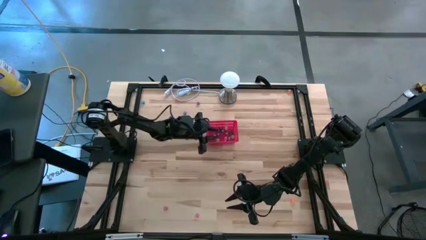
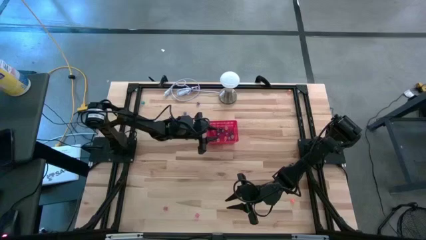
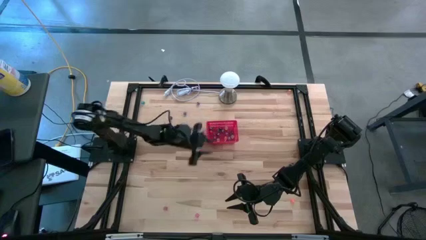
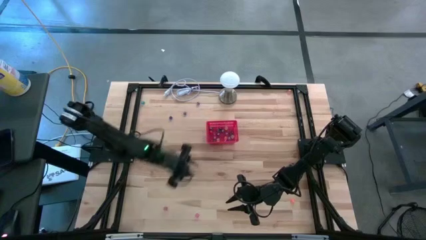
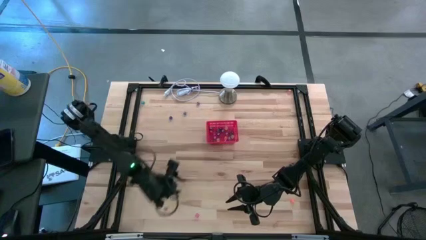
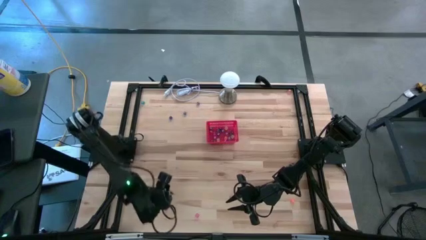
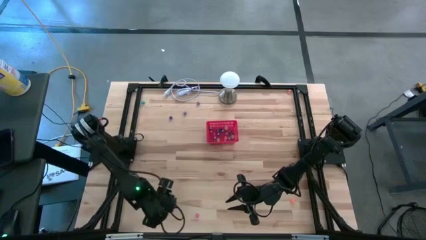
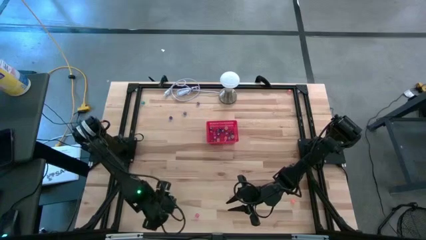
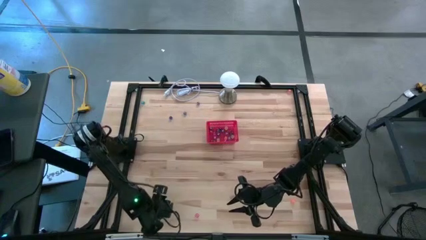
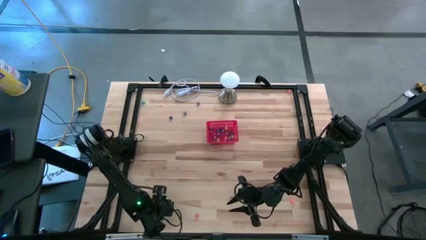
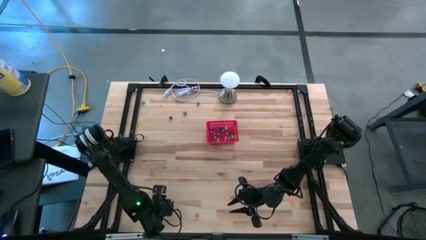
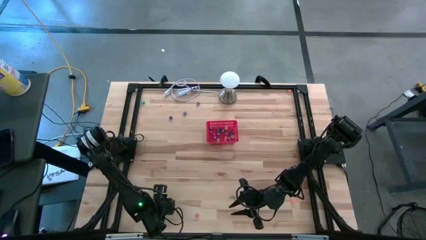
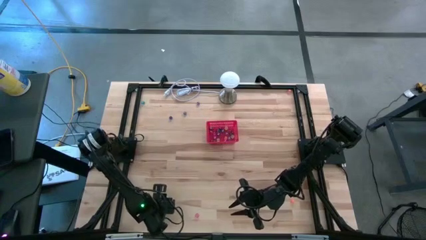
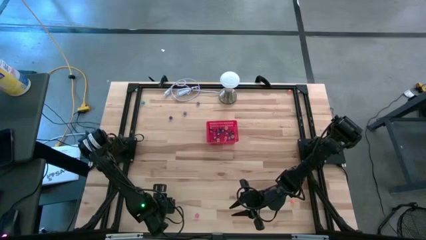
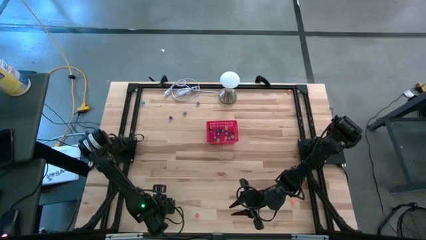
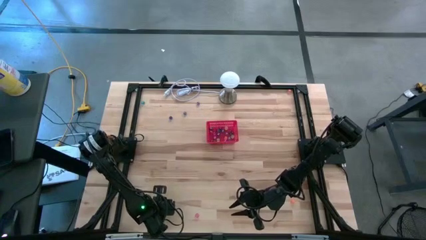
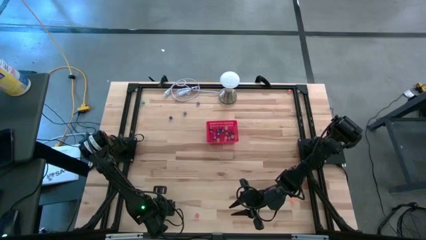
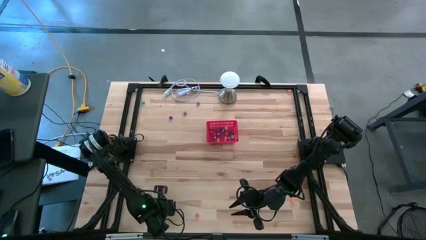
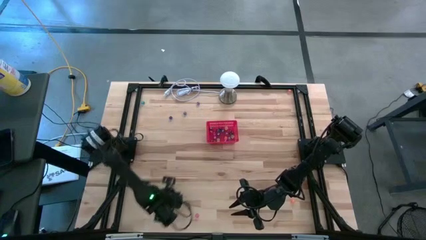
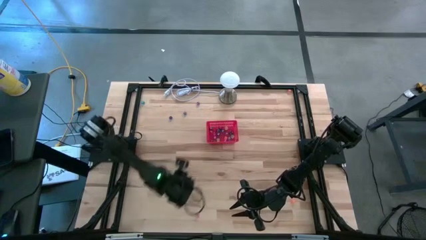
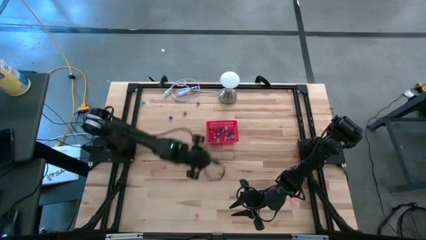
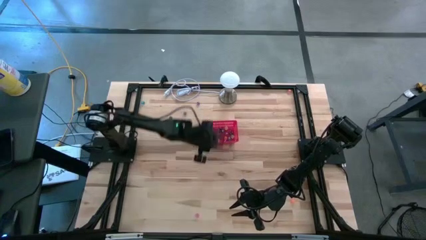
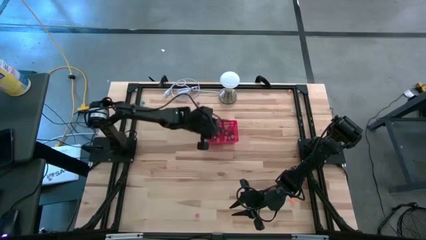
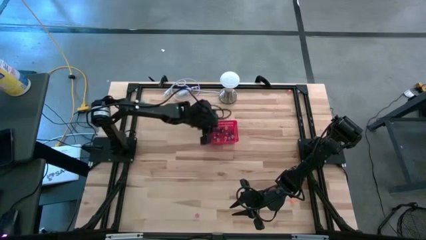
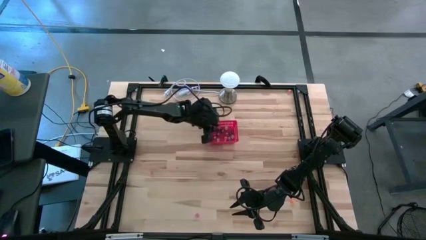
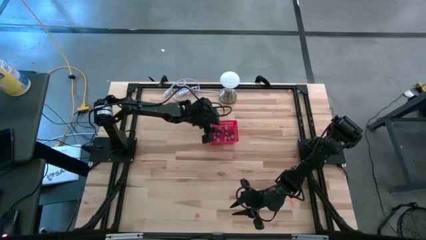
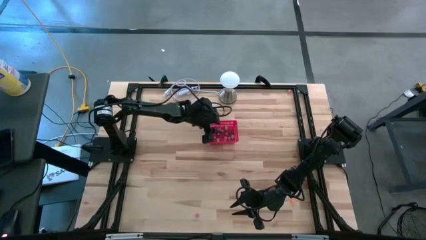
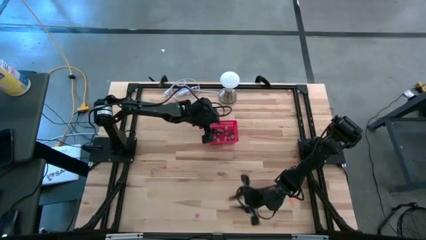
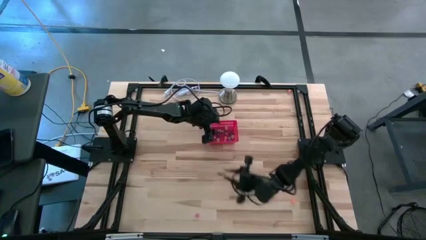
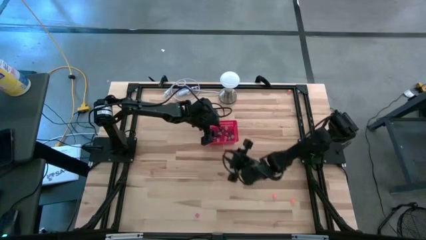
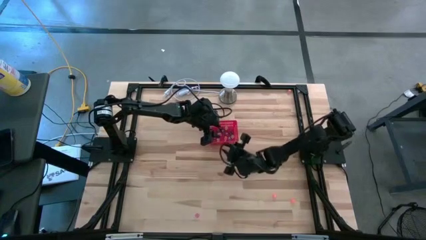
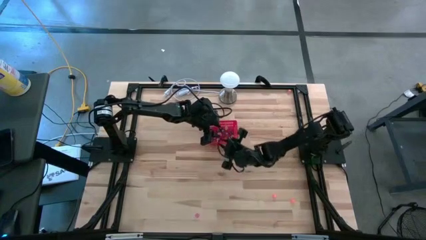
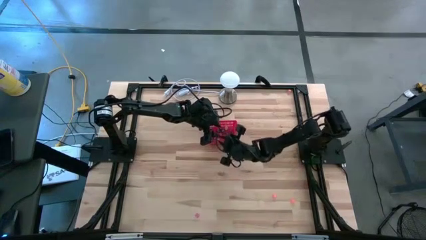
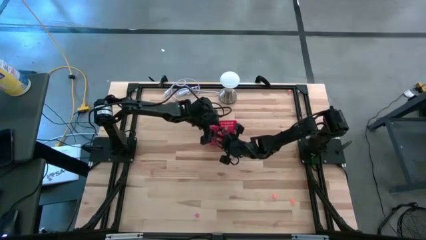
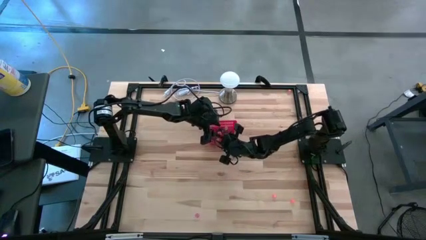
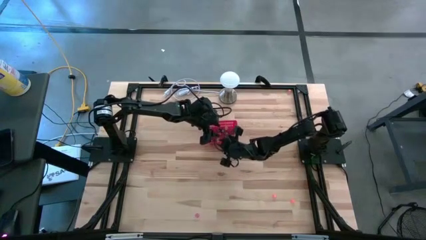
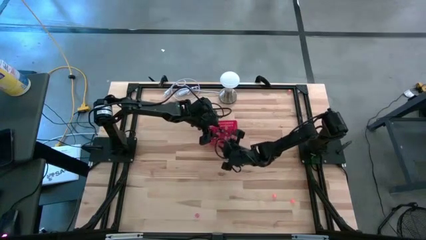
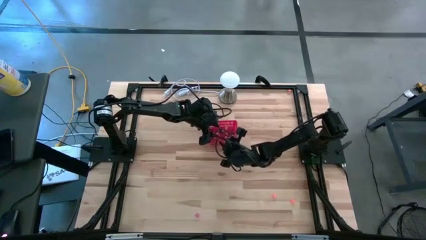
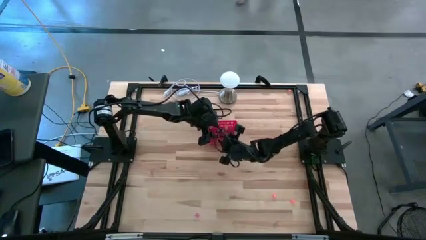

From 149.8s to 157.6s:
Task: Pick & Place Dice
Put the red dice into the bin

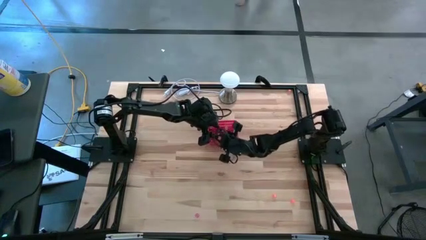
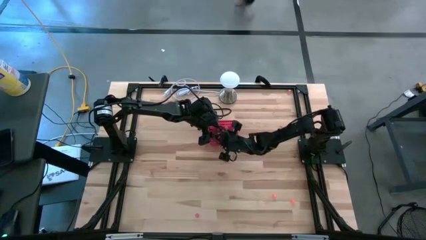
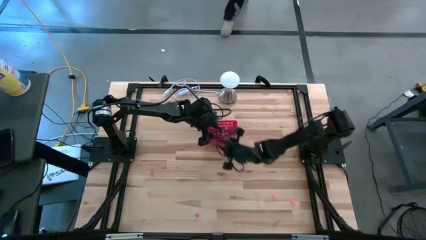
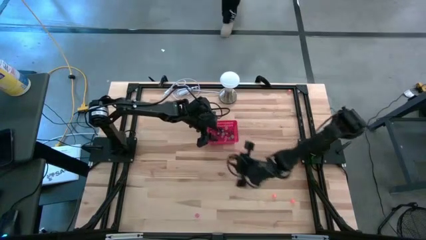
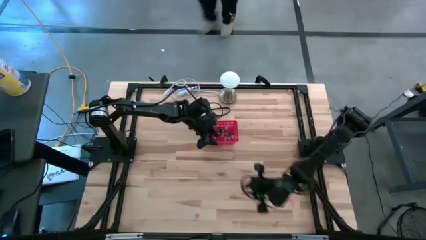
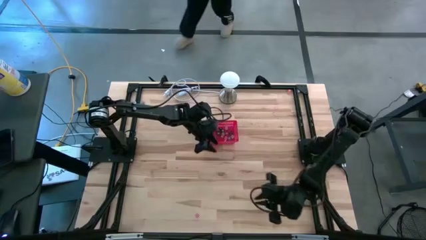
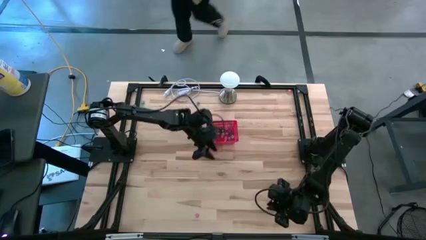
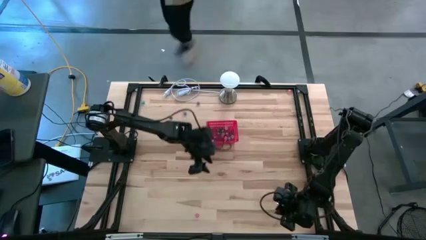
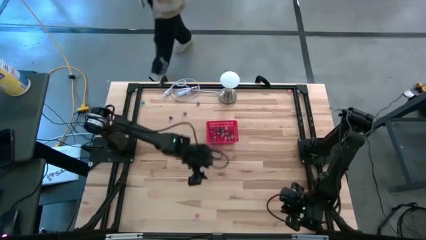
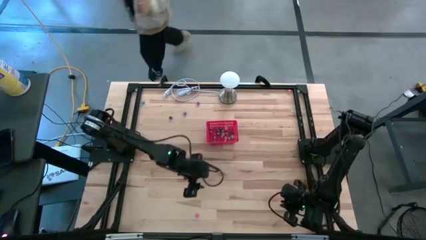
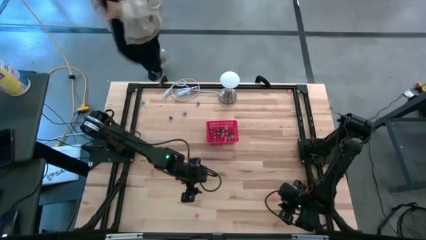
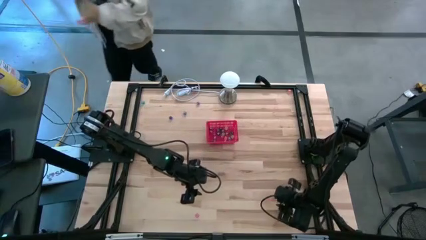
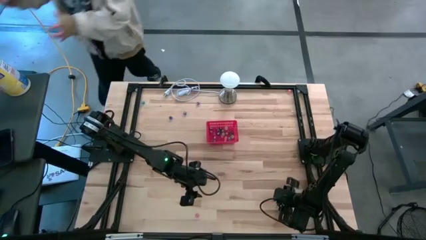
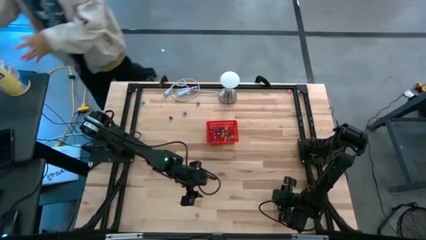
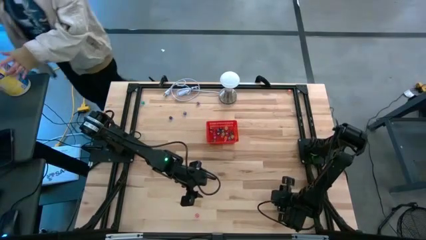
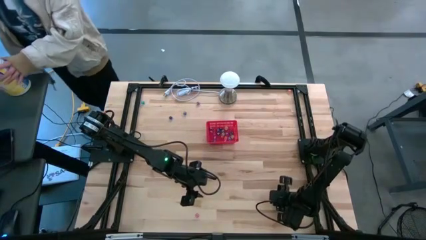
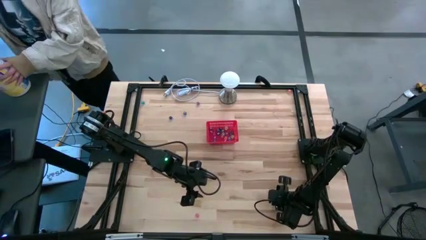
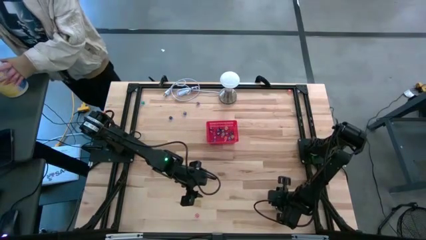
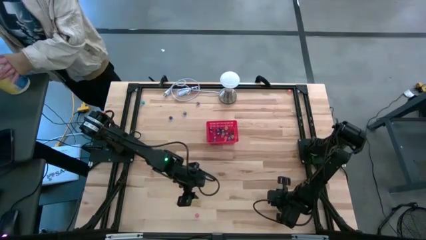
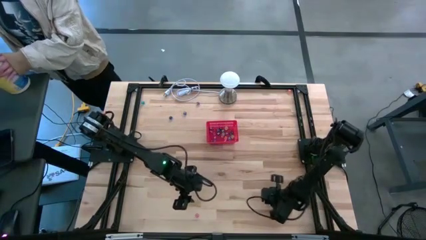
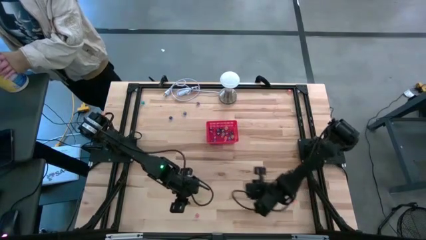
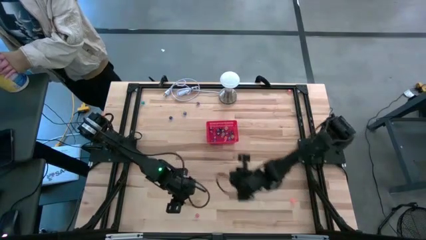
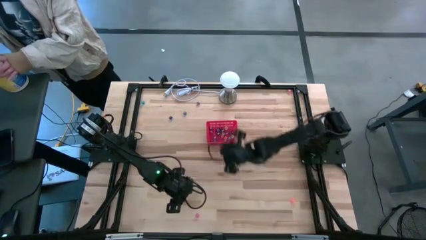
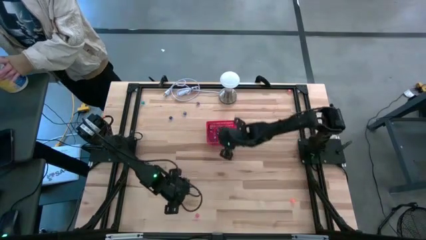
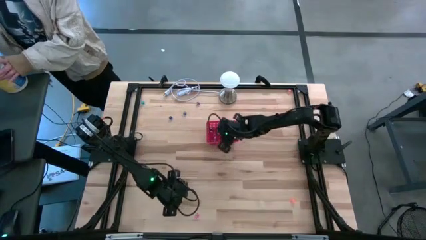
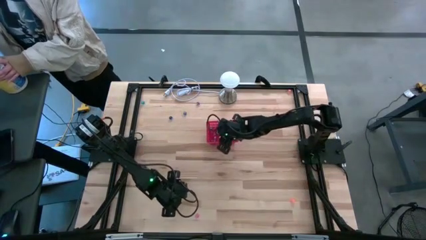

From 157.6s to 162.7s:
Put the bottom left orange dice into the bin

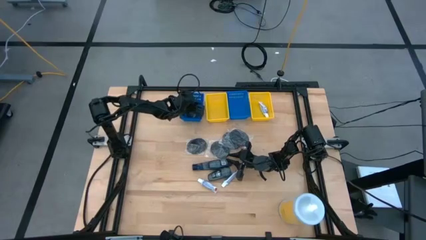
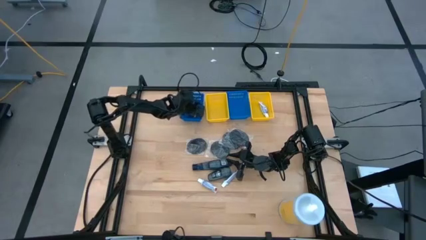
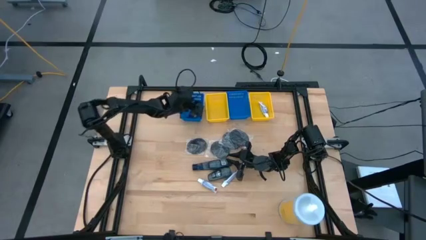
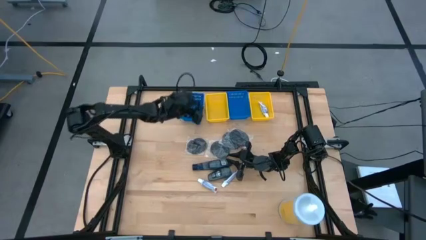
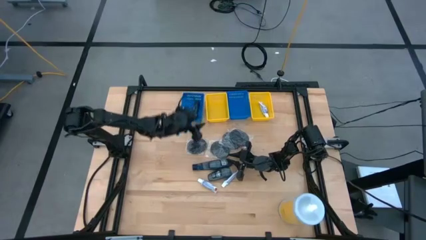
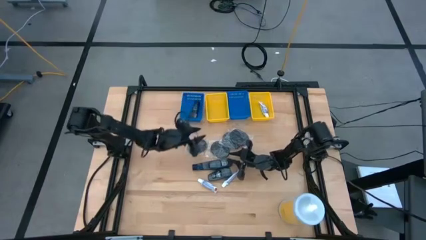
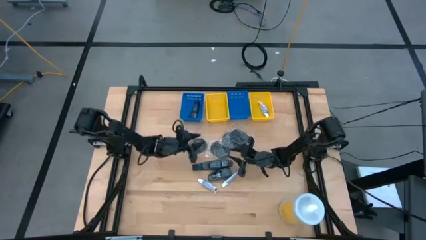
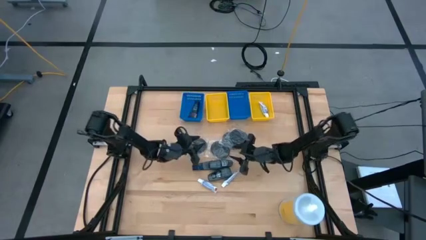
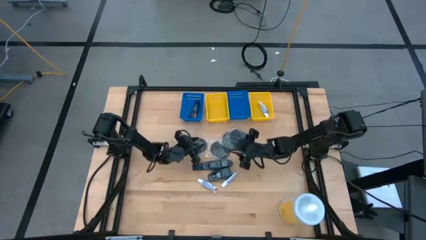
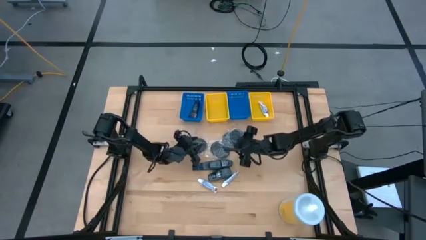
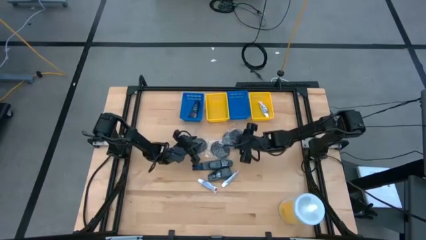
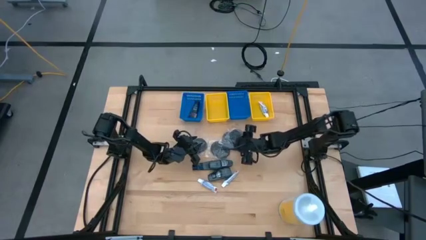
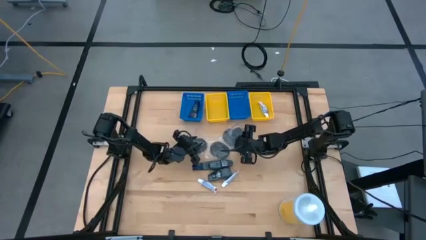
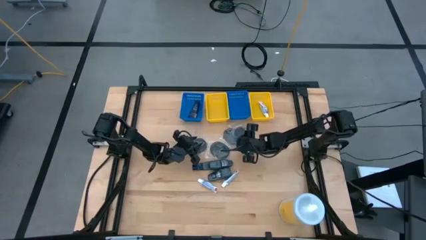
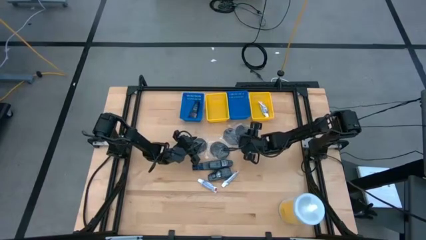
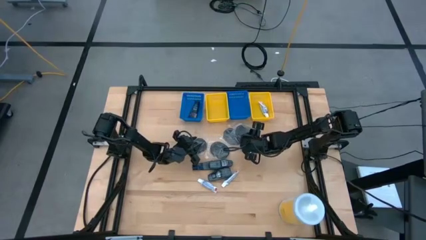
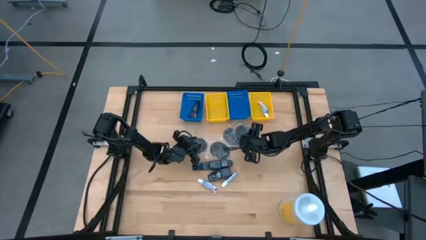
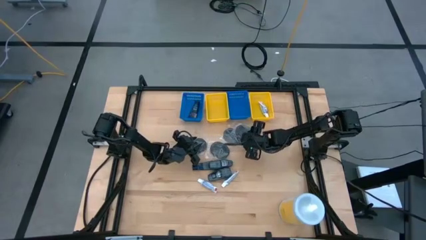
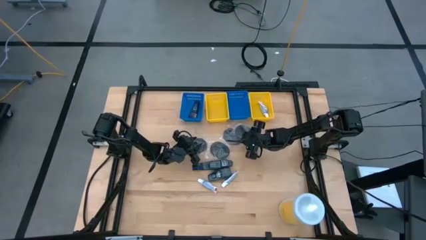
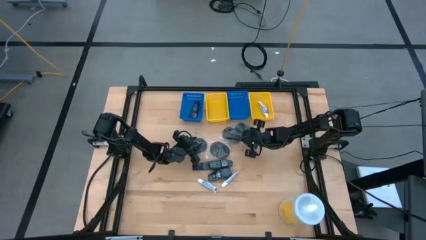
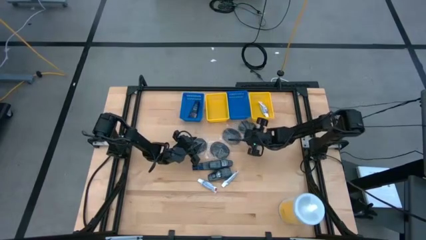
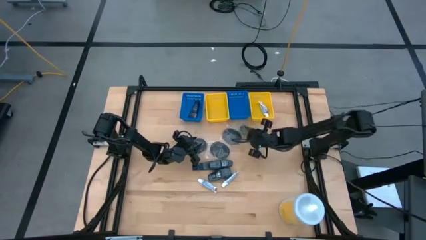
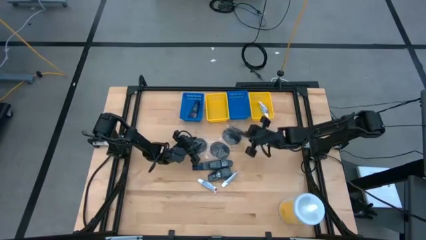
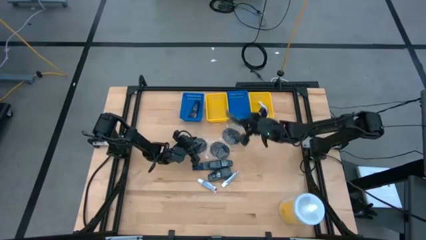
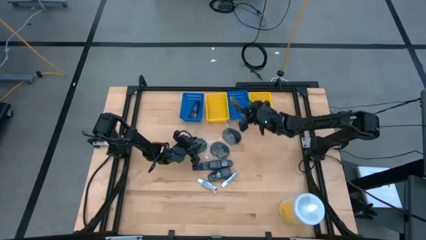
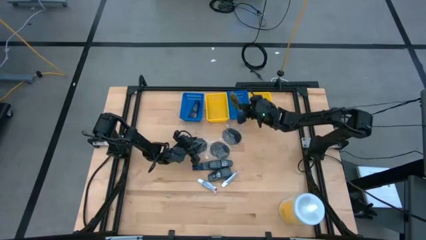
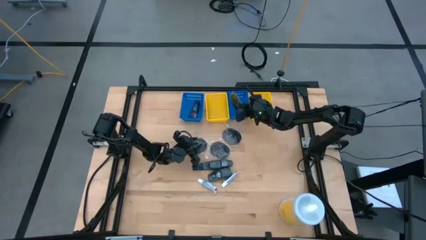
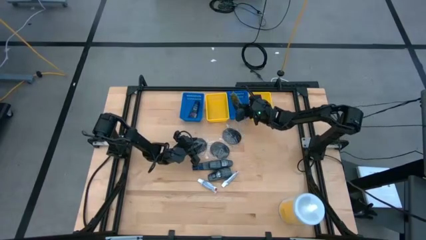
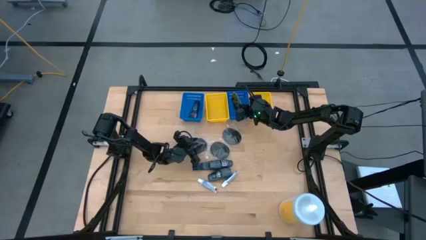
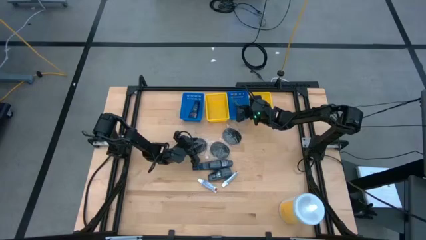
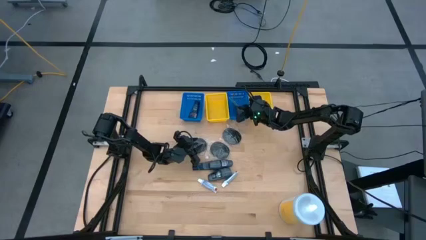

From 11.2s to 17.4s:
Task: Pick & Place Travel size toiletries
Put the black hairbrush into the right blue bin
